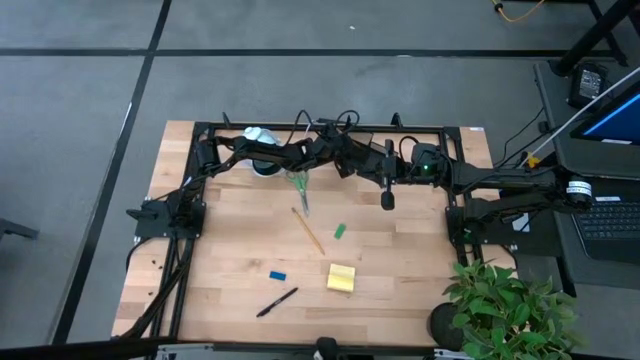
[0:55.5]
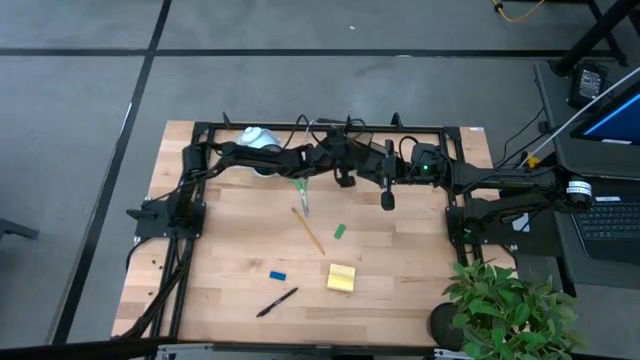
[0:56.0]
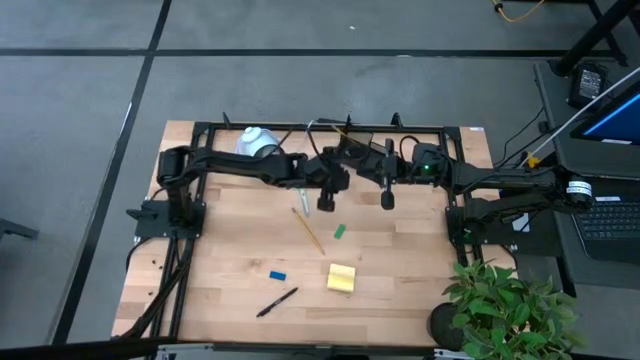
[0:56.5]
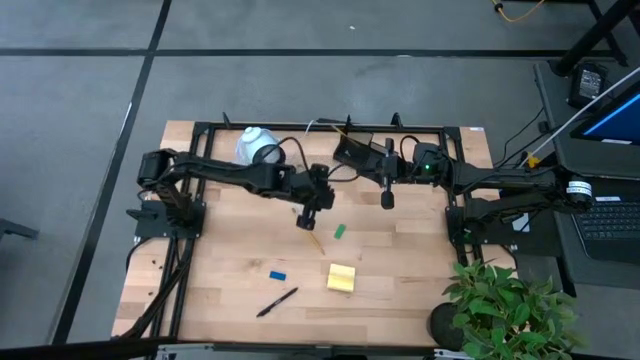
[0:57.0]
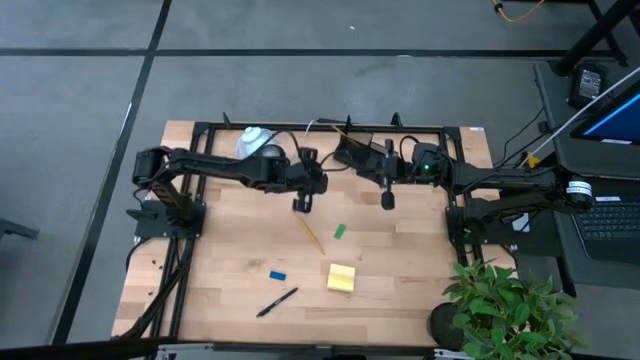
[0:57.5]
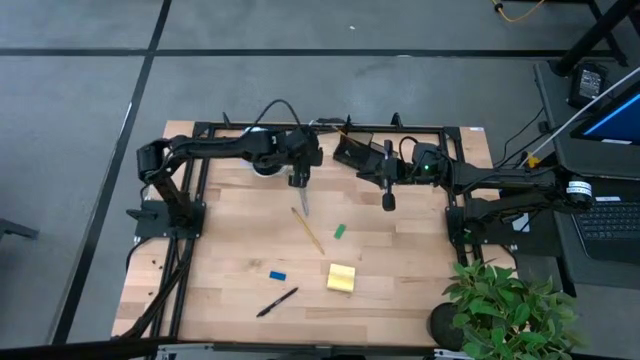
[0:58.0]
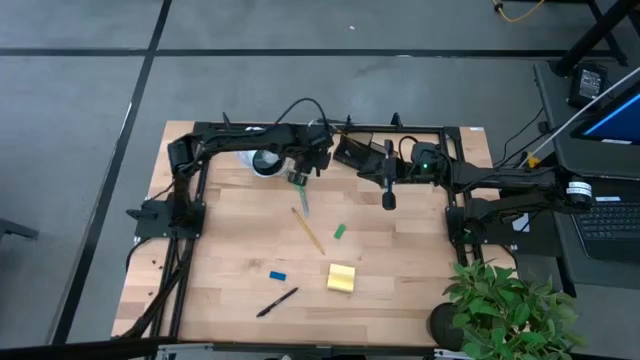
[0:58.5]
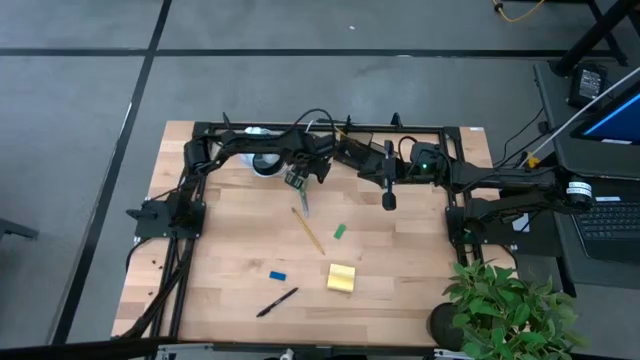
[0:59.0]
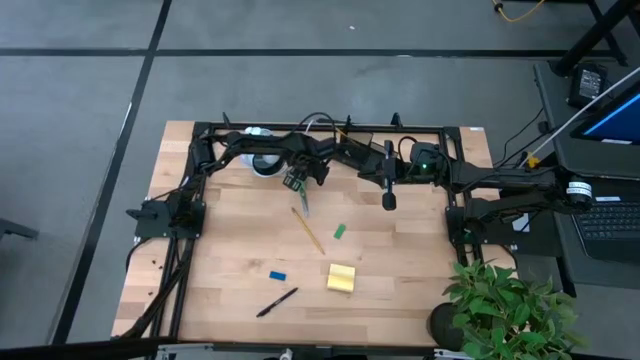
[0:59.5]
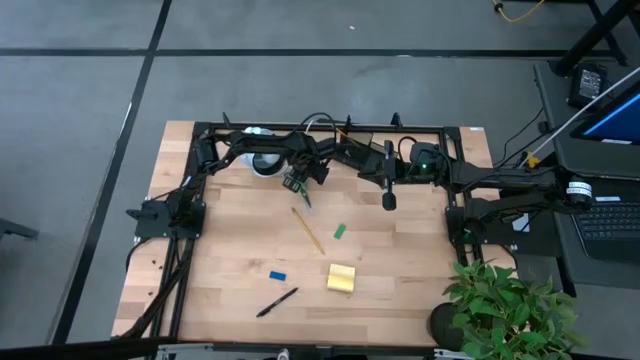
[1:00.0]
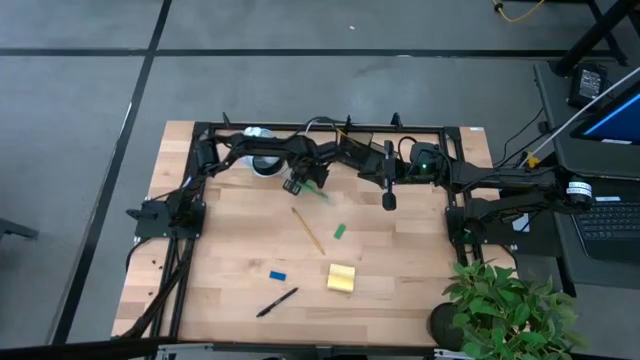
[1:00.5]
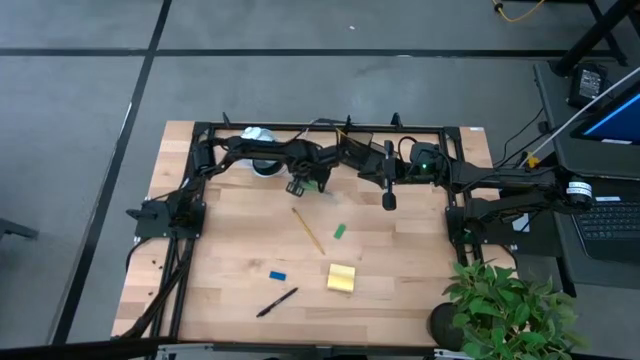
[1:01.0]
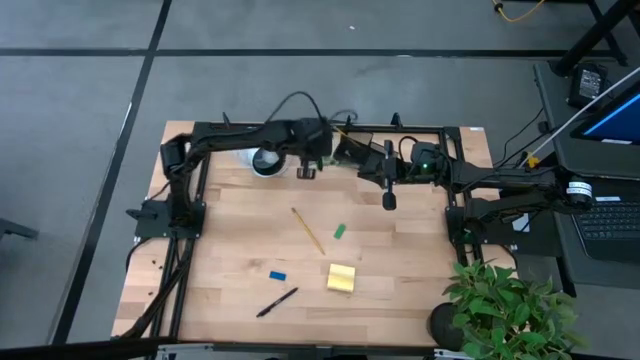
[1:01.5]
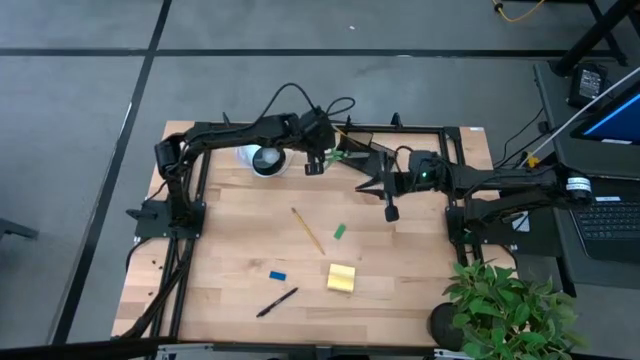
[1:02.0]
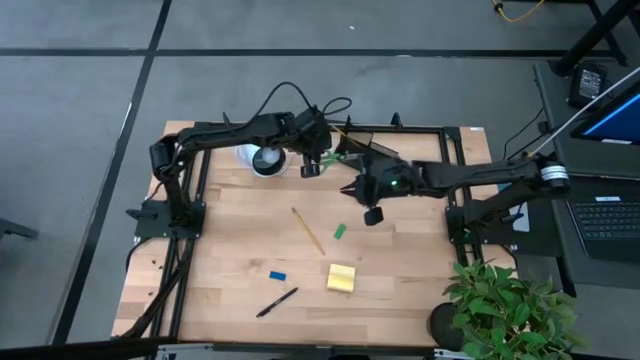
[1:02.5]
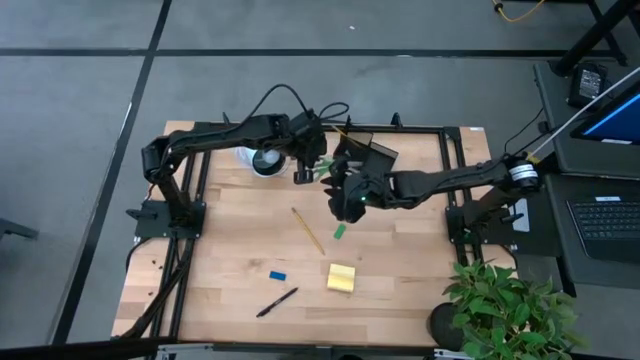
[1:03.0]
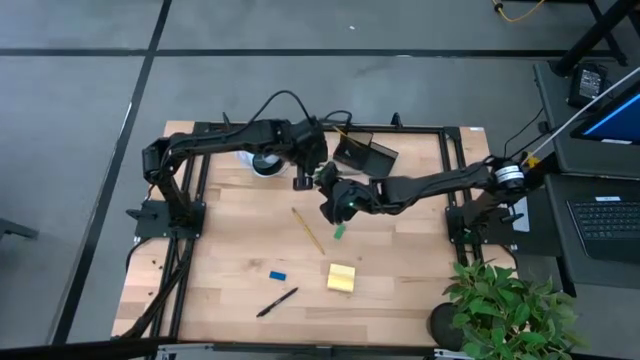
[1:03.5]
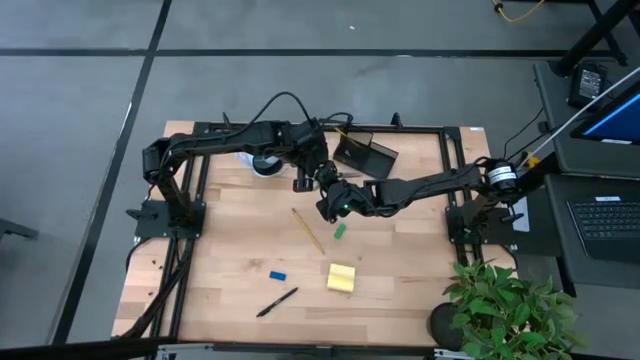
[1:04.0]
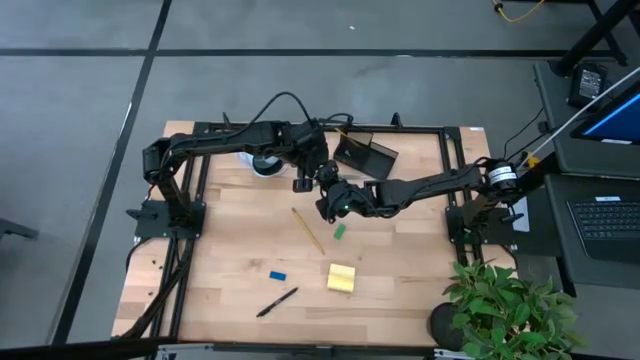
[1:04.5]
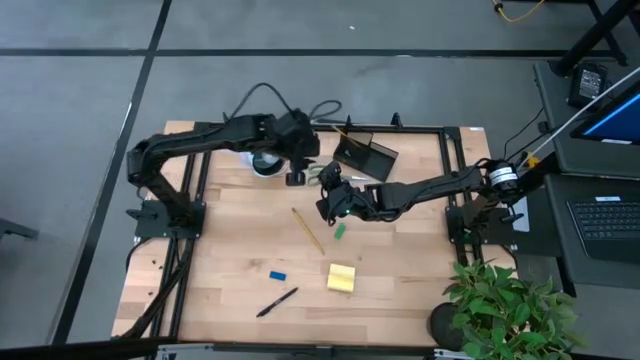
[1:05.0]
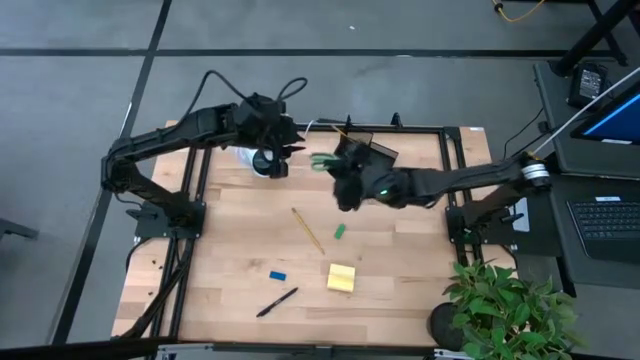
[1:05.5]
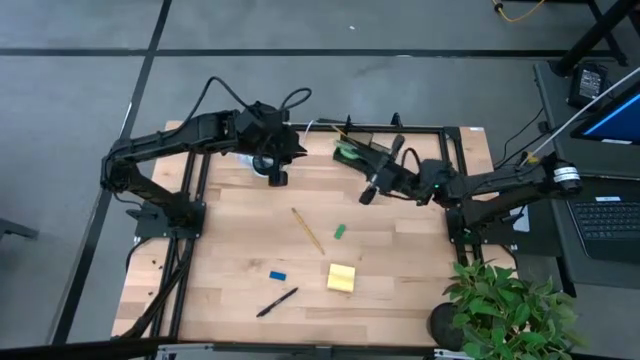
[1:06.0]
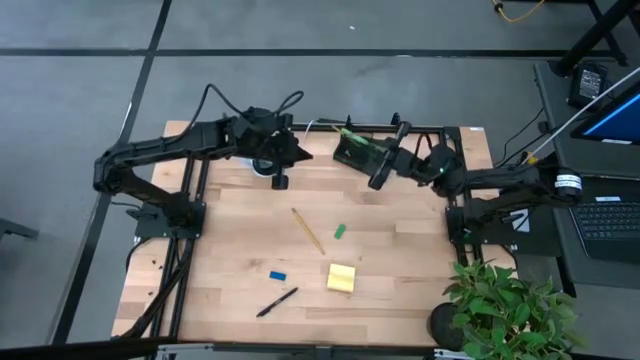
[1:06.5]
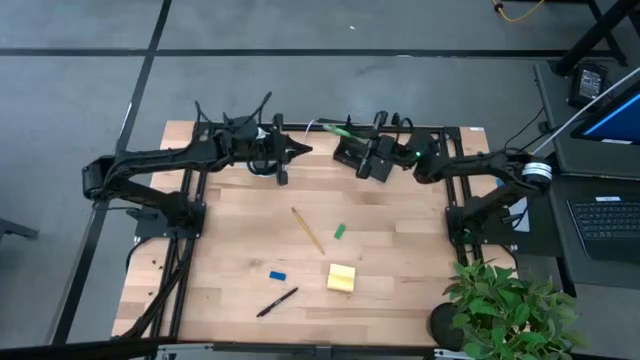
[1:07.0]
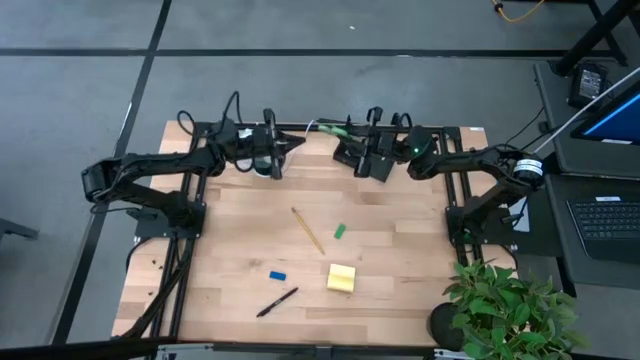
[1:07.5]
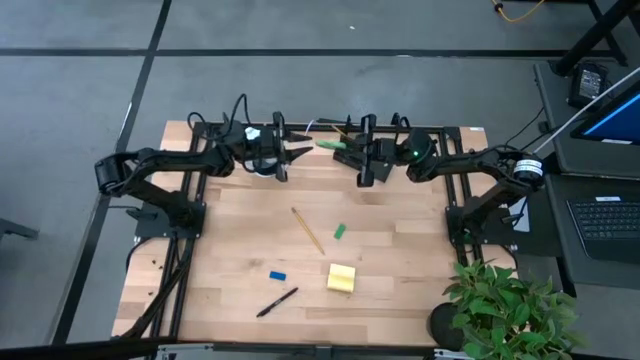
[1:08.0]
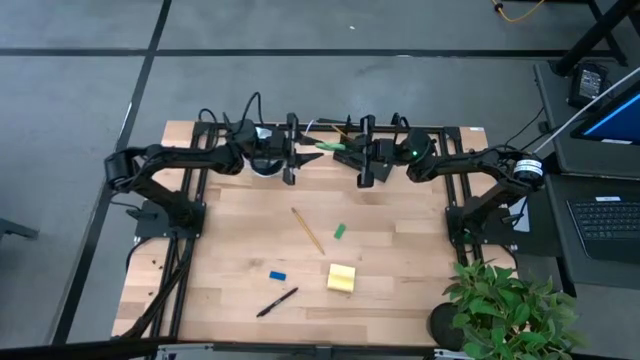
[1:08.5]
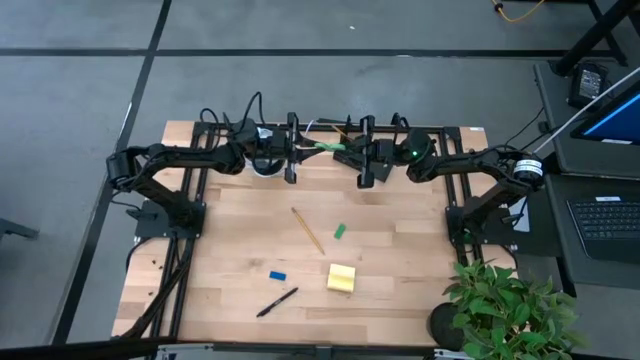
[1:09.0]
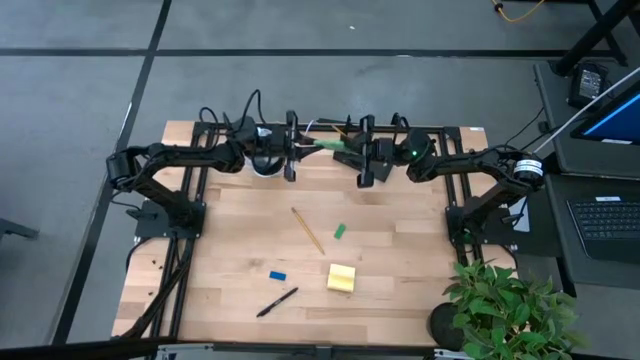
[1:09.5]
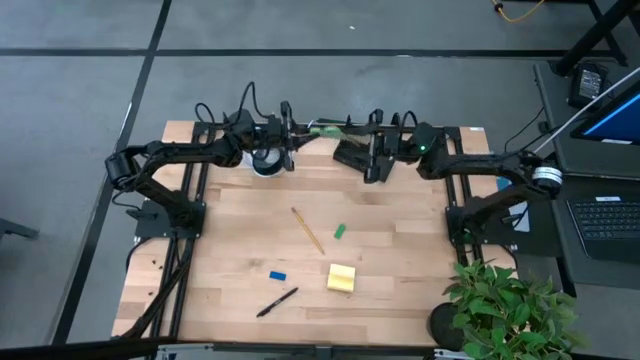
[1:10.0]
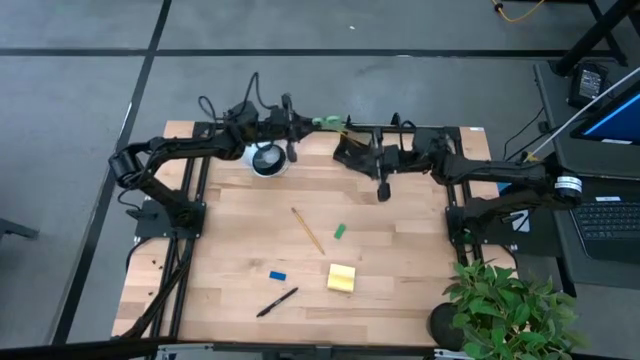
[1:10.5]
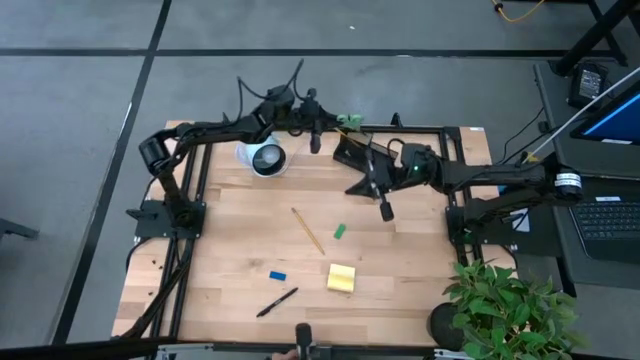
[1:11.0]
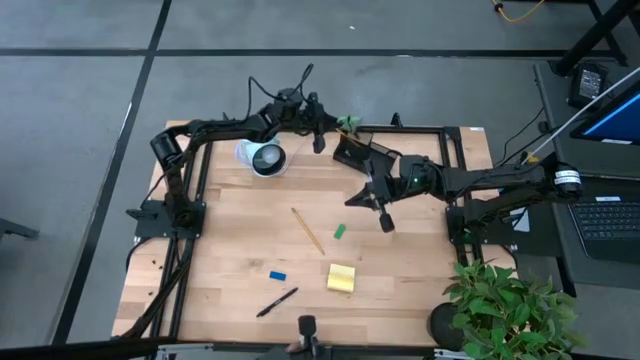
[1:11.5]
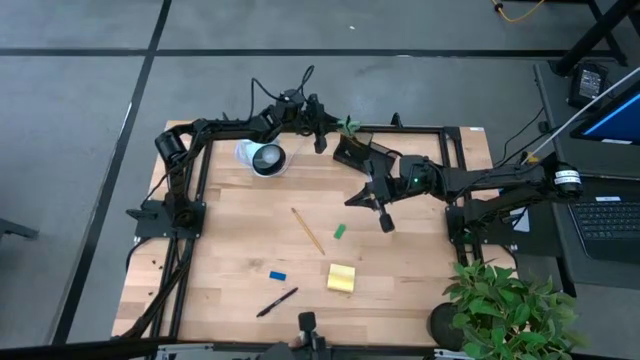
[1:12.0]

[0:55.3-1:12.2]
Task: Pick and place office supplies into organizer
Put the green scissors into the desk organizer

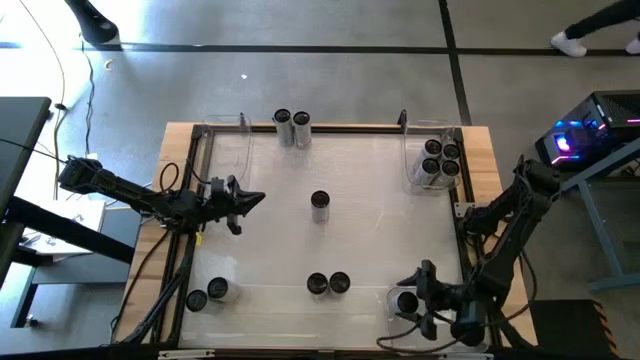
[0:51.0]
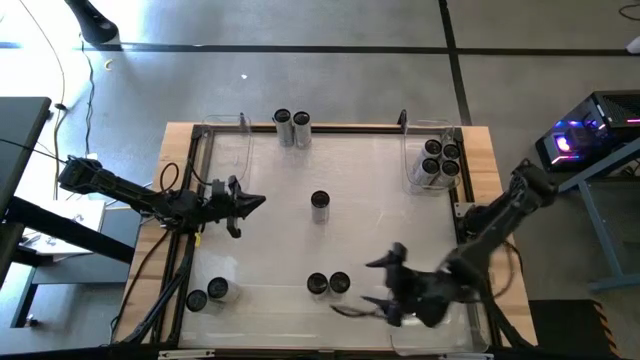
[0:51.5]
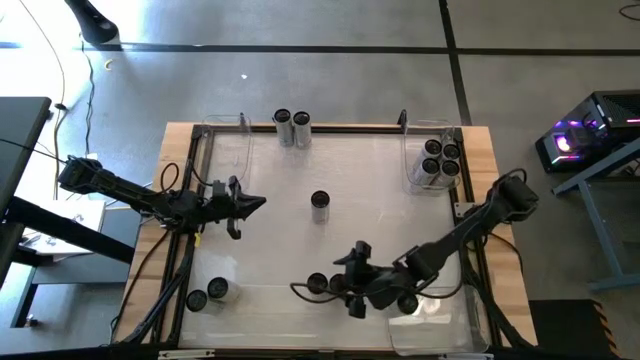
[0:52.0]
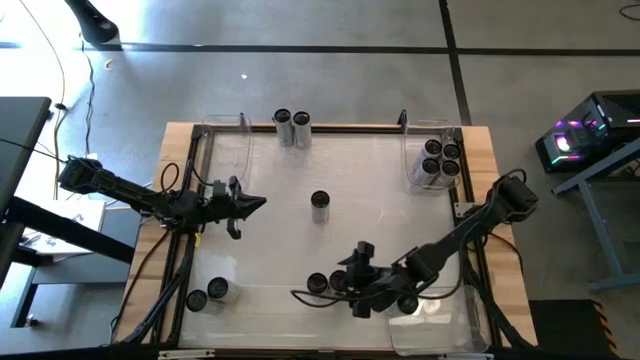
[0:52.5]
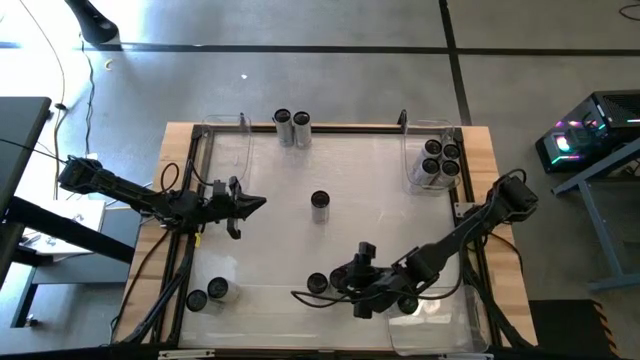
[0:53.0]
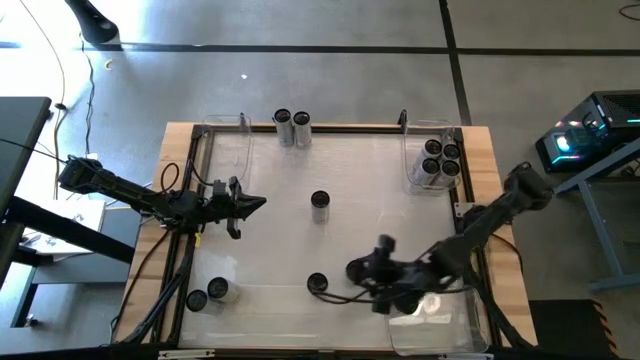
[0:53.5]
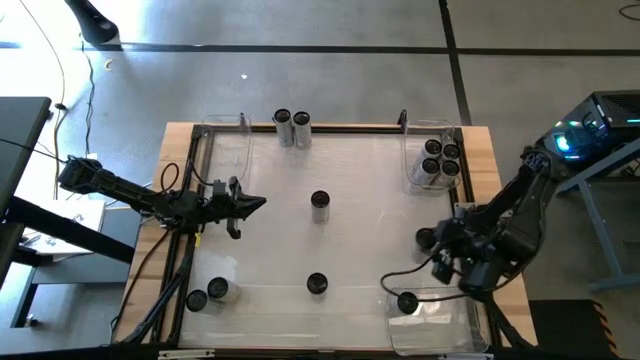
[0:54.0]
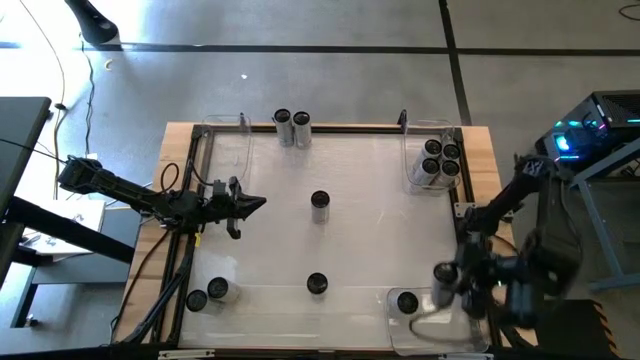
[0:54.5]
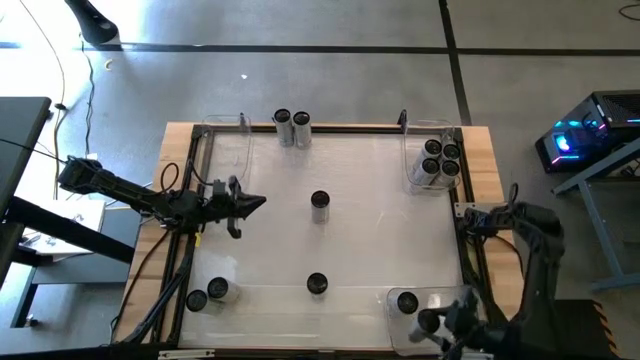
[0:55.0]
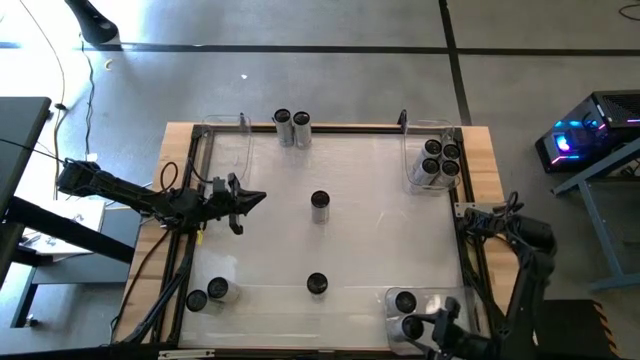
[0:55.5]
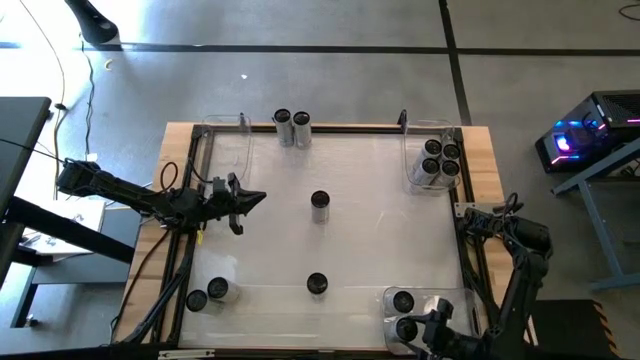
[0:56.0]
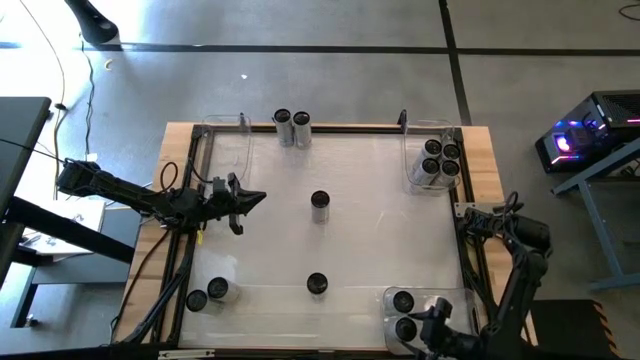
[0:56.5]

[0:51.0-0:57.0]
Task: Sort soda cans
Put the blue soda can into the bottom right transparent bin
